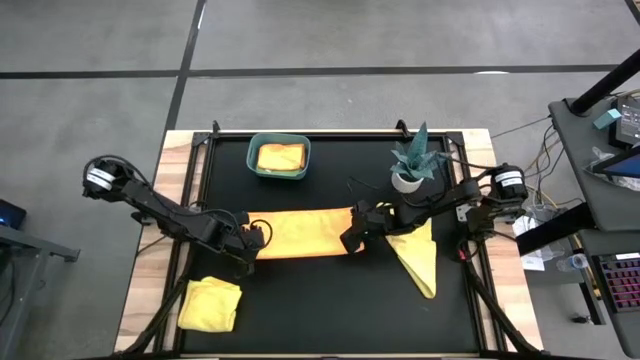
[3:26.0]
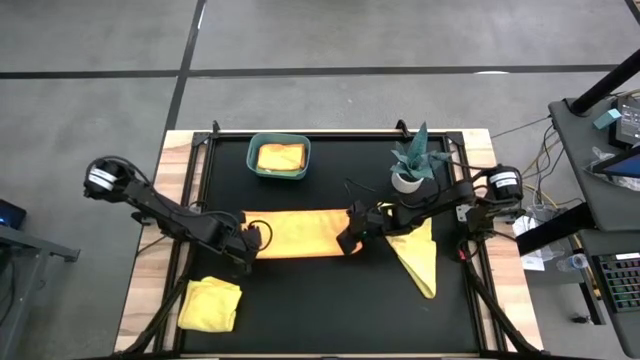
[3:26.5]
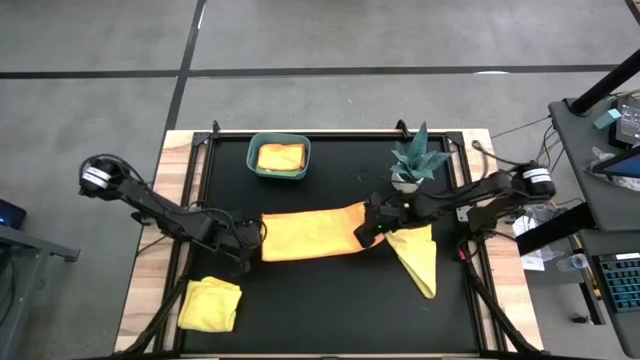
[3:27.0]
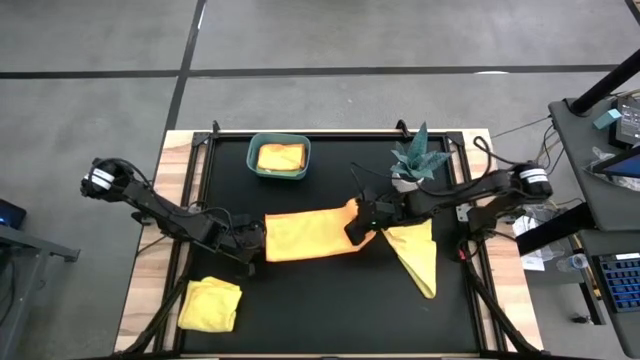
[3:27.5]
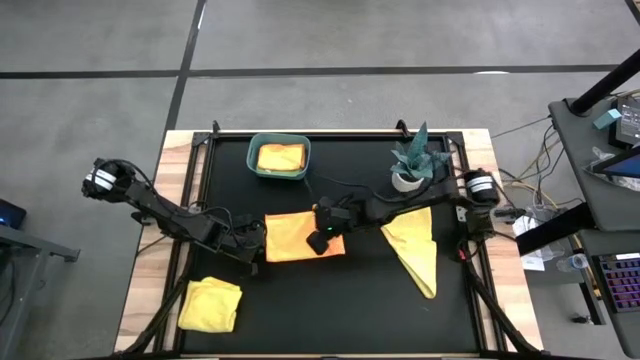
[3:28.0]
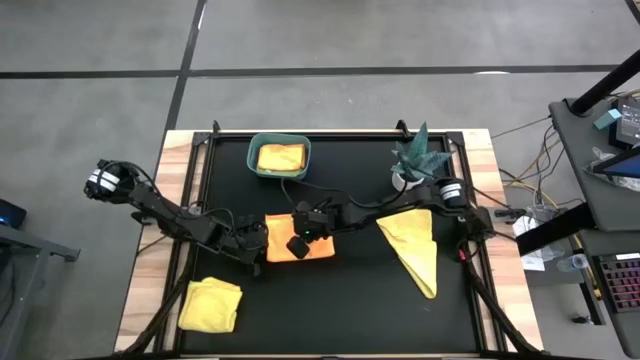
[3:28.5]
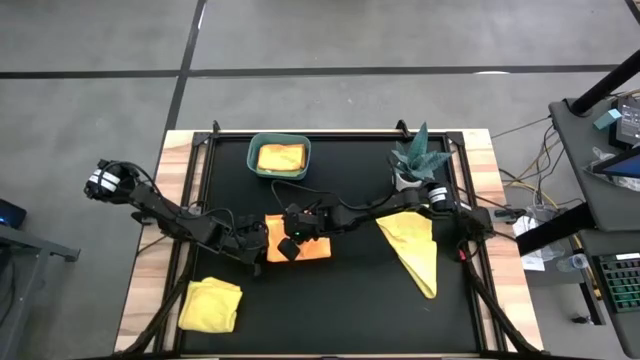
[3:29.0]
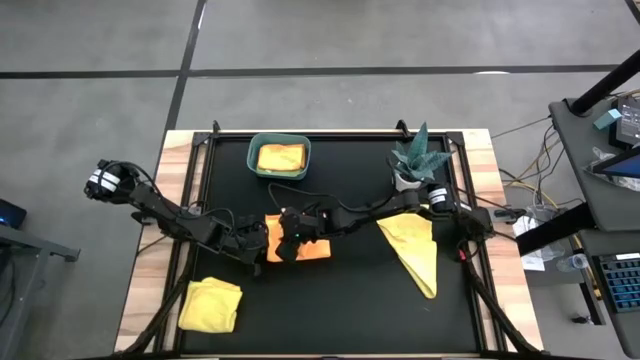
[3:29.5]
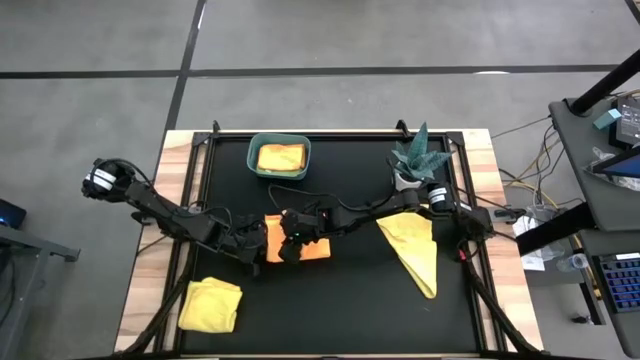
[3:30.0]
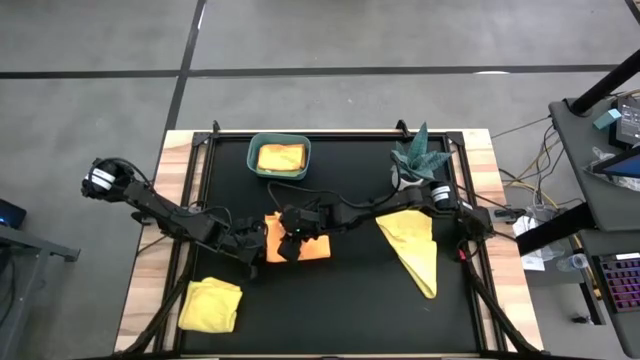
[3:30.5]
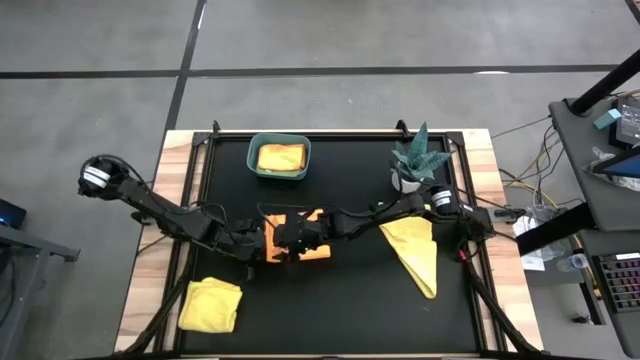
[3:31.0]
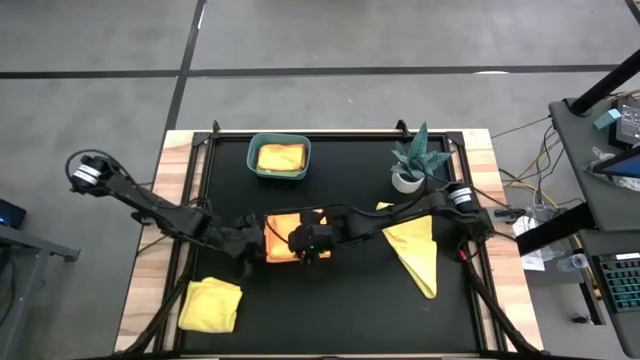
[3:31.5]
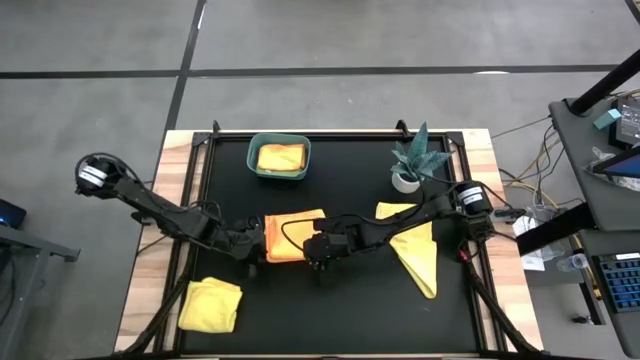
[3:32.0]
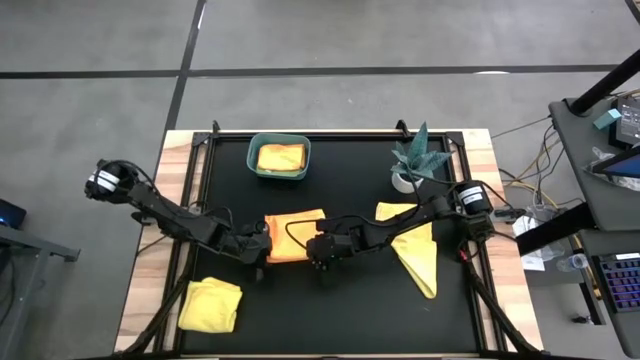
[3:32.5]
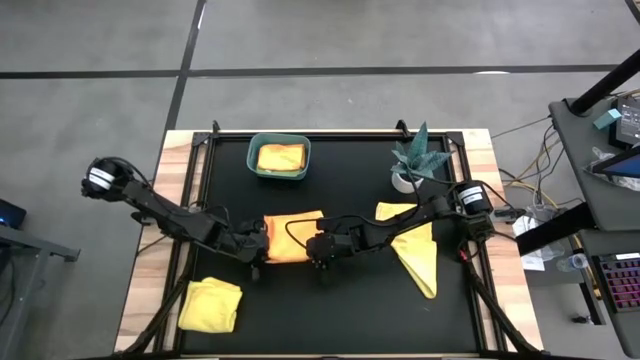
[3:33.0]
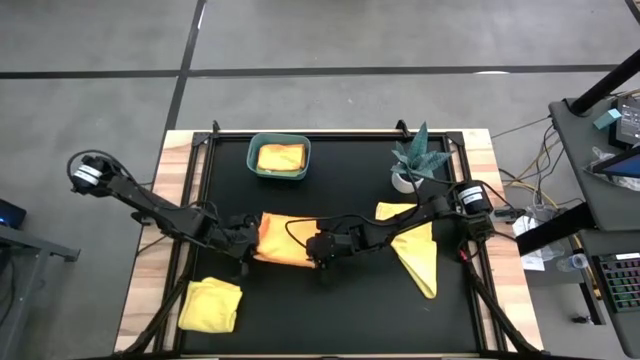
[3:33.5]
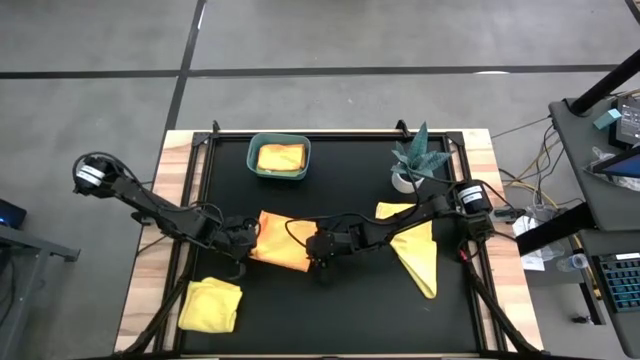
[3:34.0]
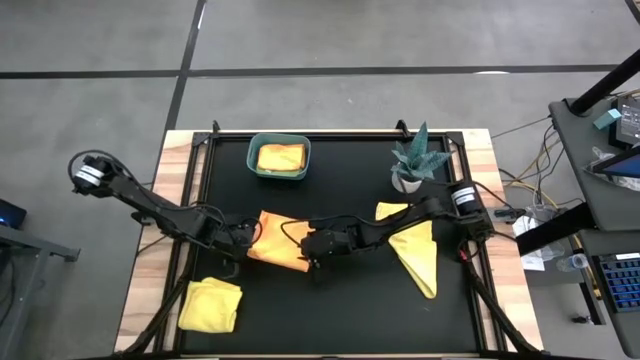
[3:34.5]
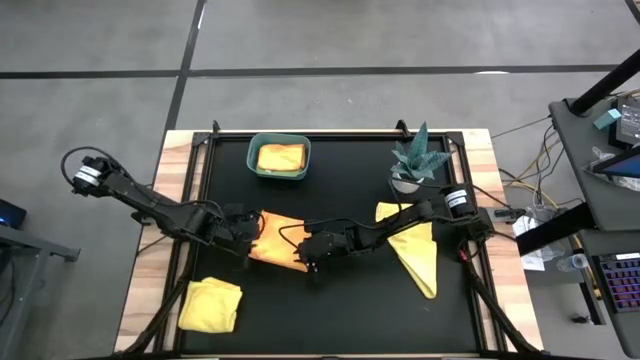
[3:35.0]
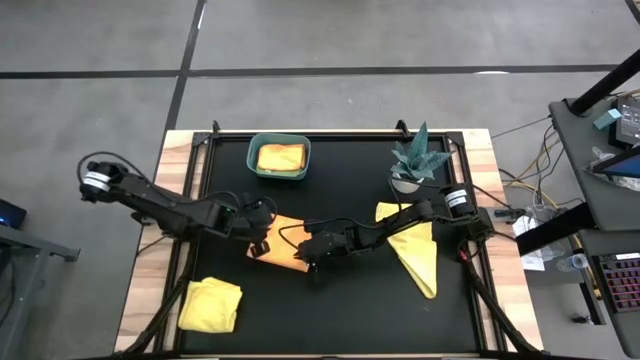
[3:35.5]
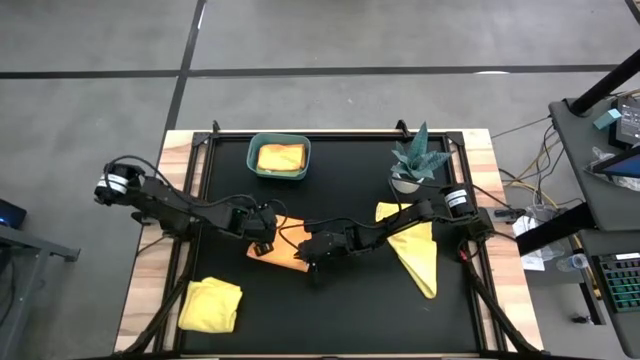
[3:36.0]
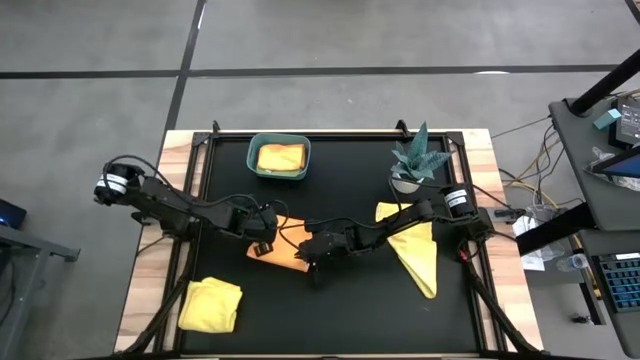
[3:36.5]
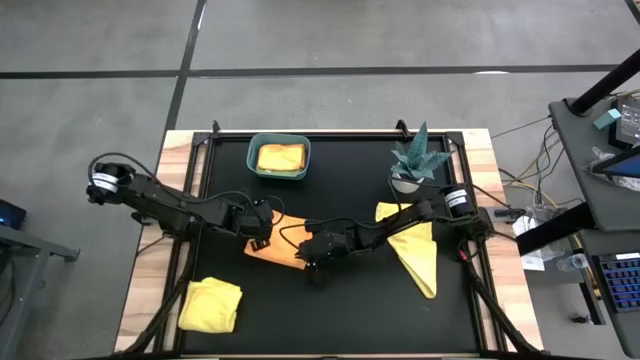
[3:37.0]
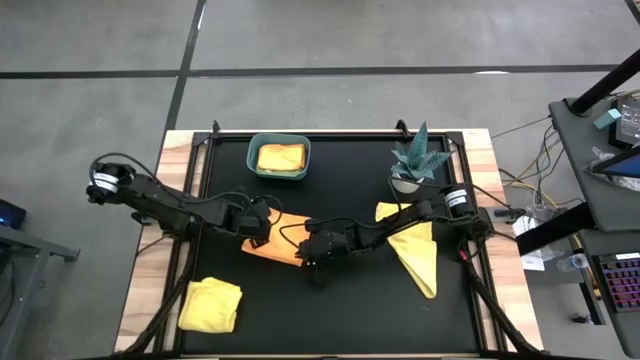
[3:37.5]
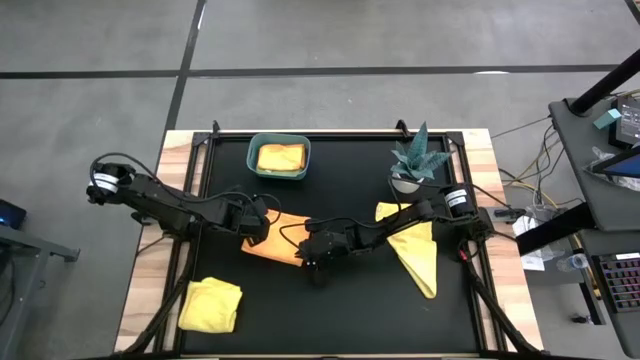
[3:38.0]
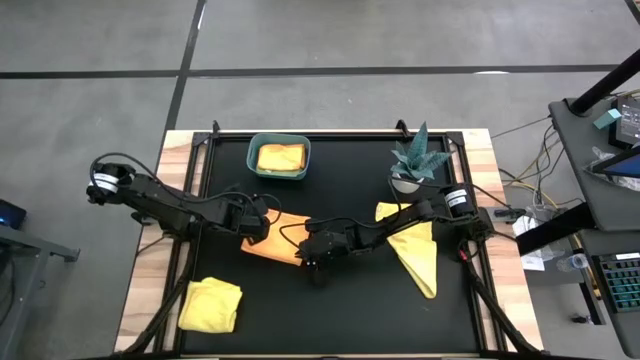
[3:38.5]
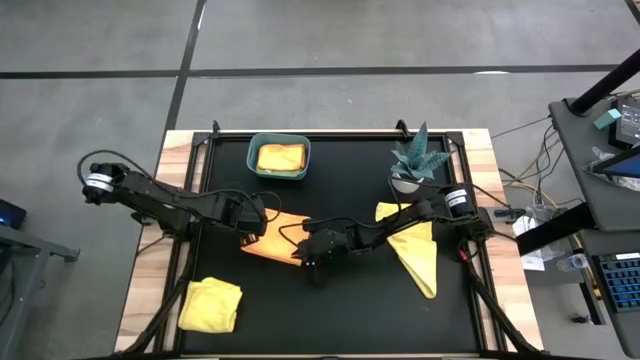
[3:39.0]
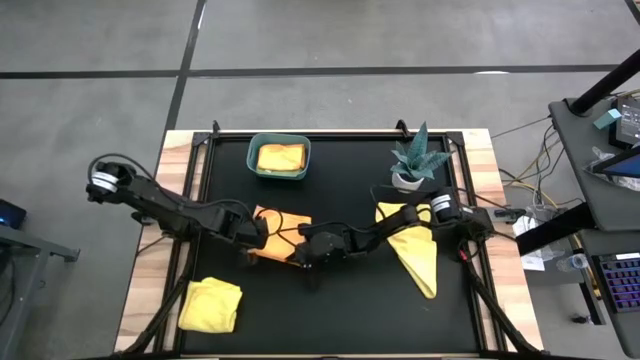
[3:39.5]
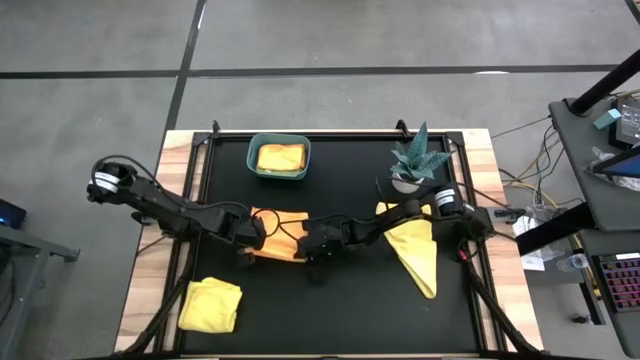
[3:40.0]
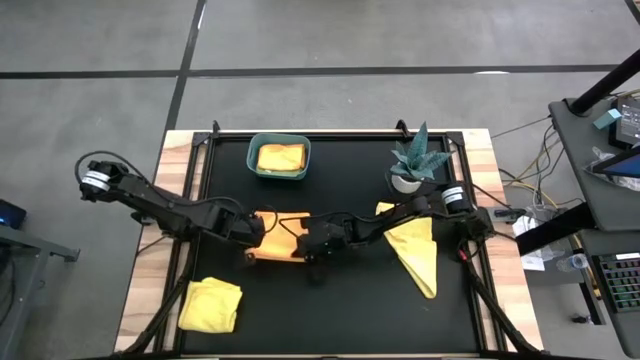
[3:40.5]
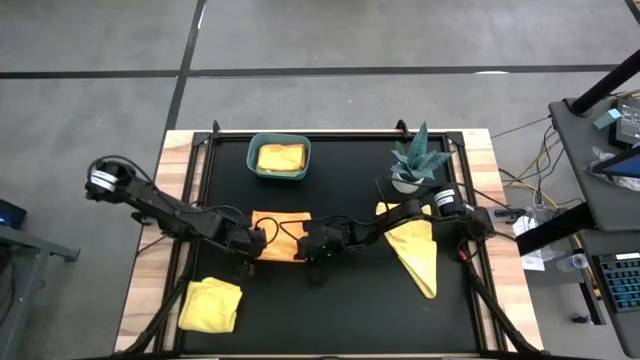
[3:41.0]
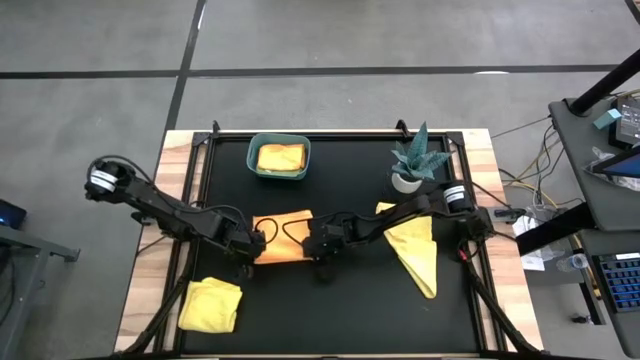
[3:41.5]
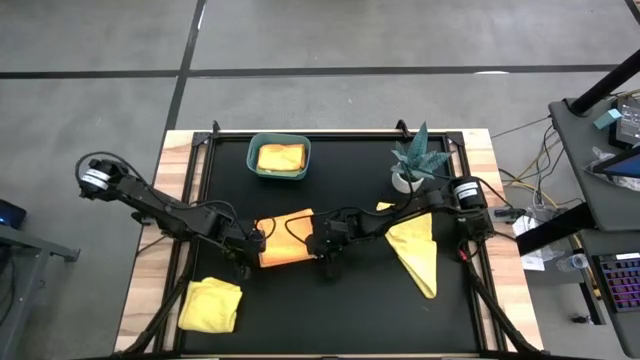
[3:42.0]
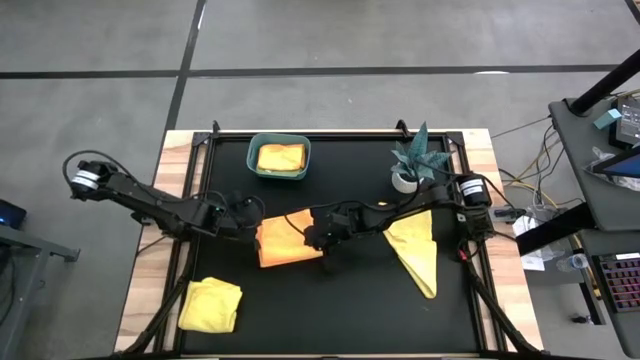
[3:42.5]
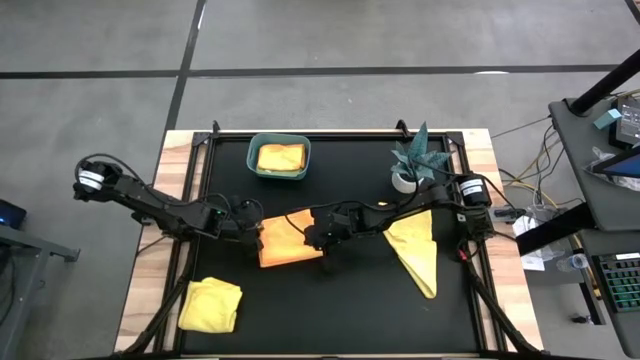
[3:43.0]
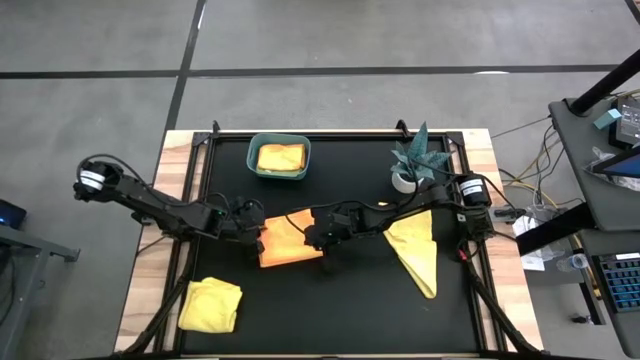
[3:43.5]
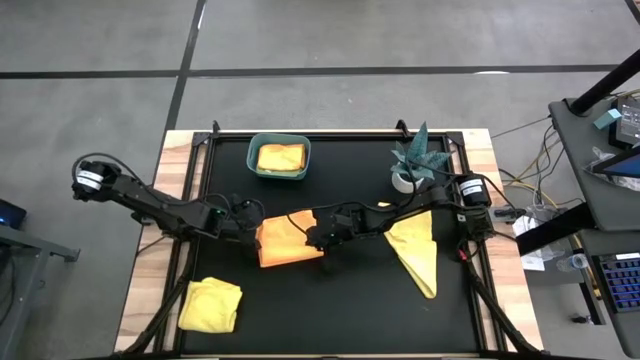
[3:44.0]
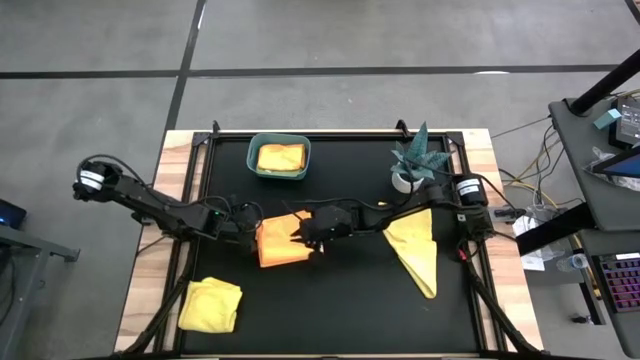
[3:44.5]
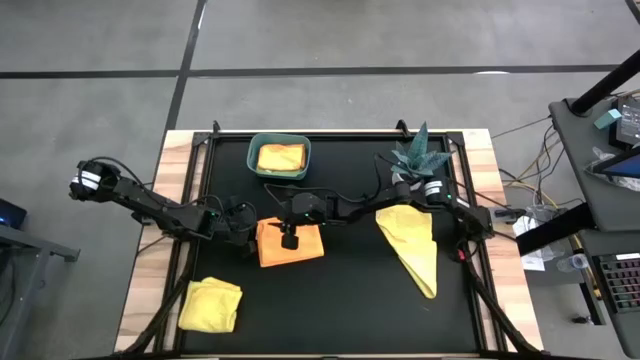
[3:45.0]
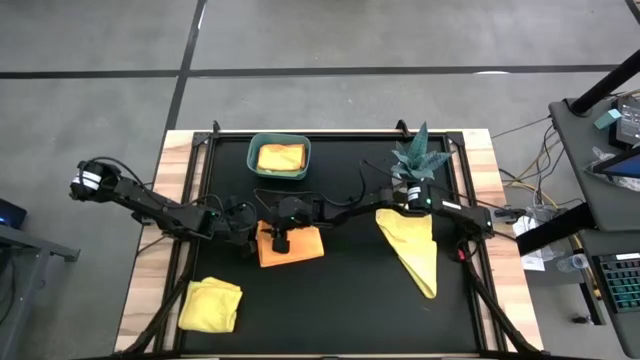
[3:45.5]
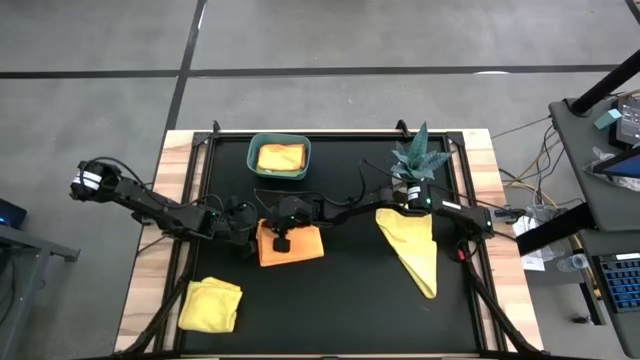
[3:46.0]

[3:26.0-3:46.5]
Task: Fold microfiber towels
Fold the orange microfiber cloth
